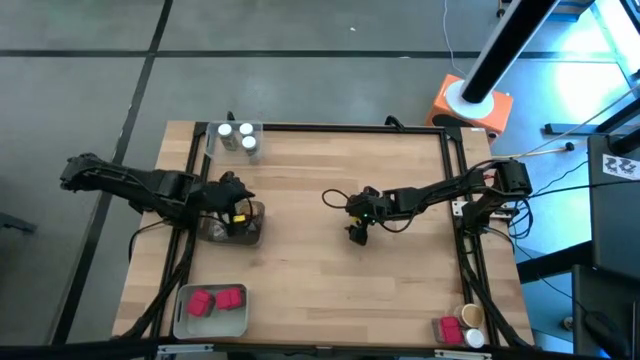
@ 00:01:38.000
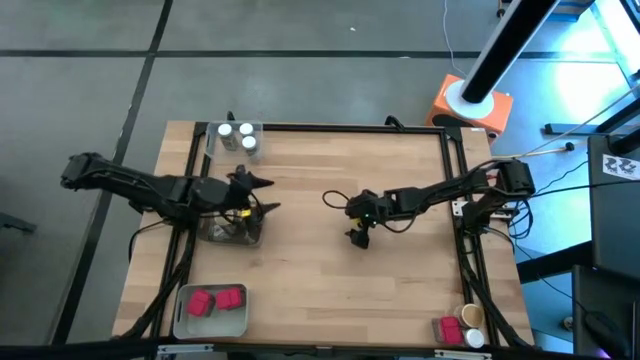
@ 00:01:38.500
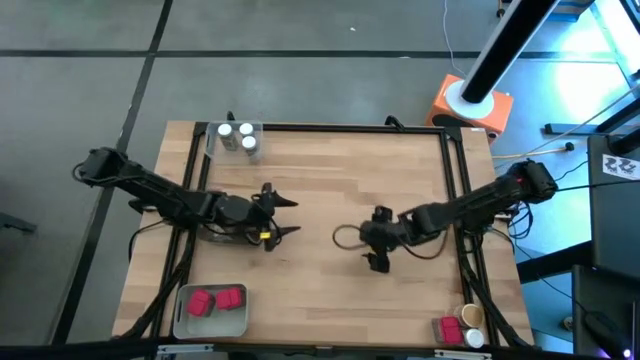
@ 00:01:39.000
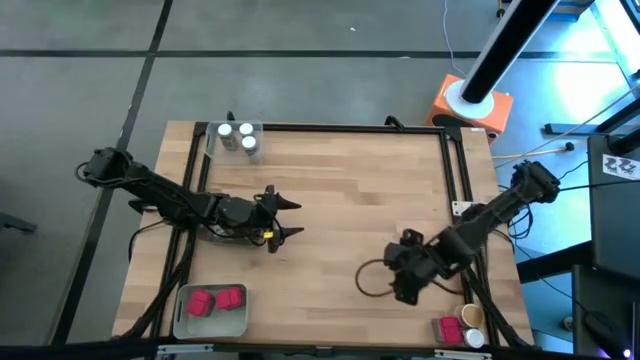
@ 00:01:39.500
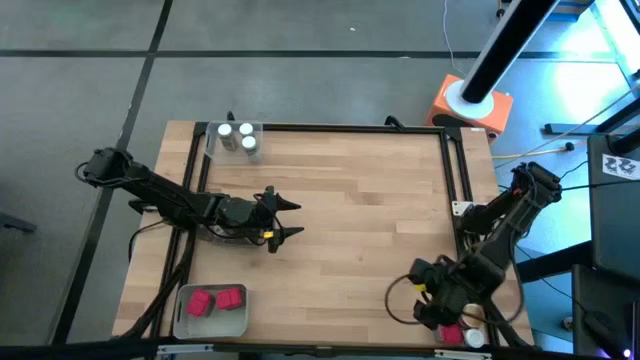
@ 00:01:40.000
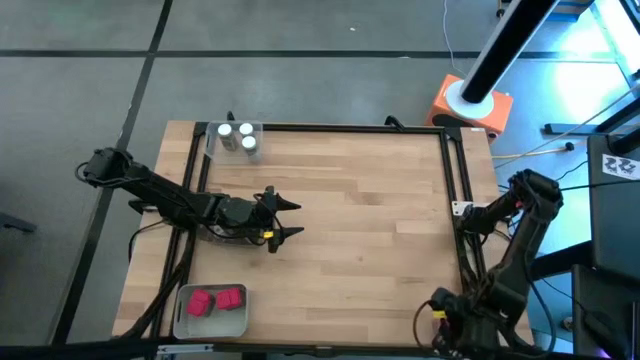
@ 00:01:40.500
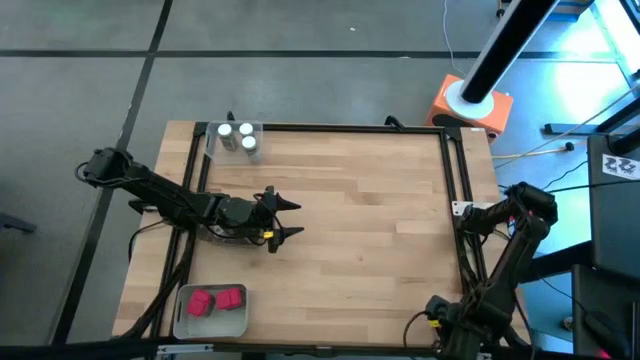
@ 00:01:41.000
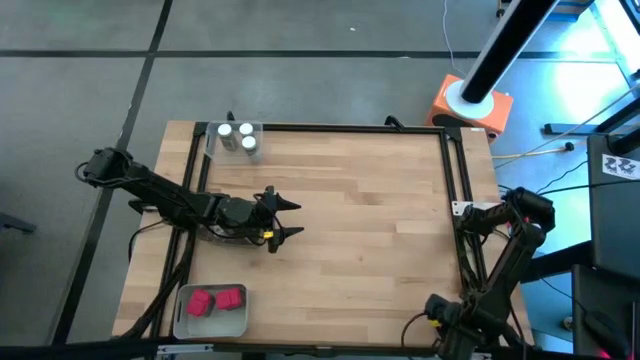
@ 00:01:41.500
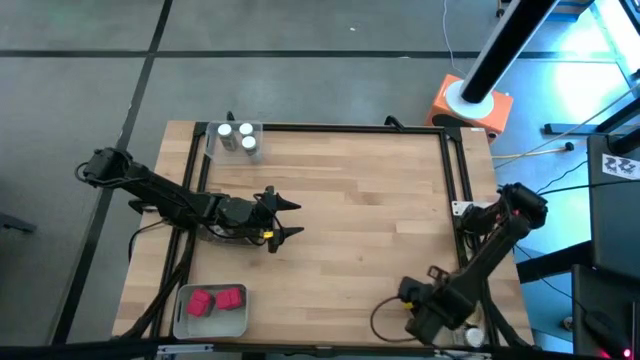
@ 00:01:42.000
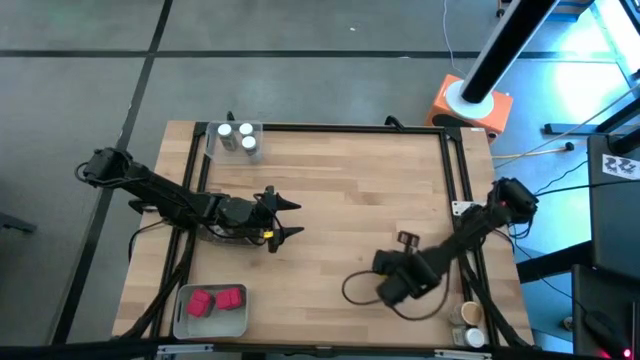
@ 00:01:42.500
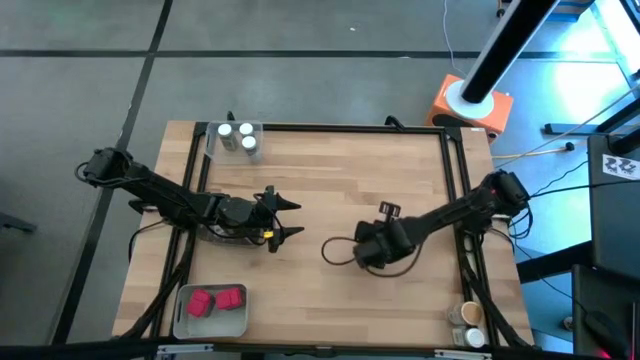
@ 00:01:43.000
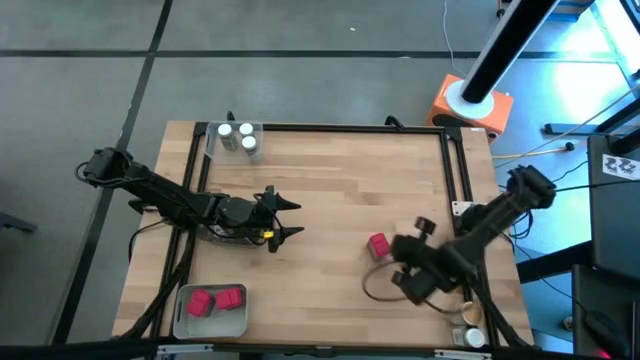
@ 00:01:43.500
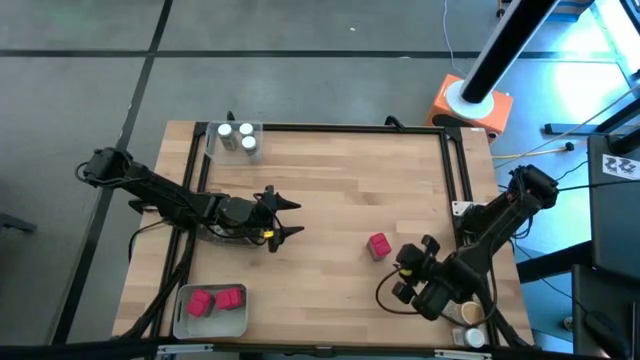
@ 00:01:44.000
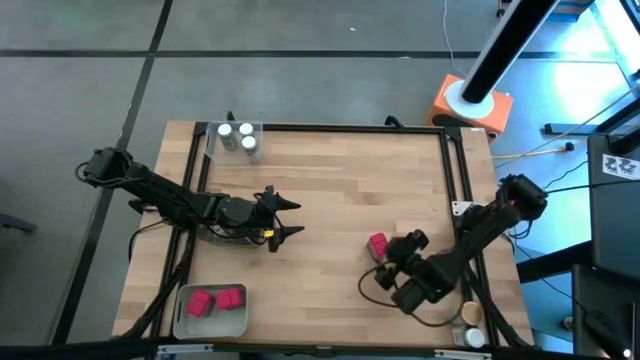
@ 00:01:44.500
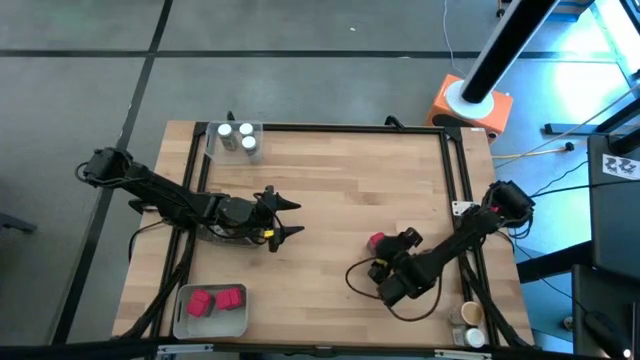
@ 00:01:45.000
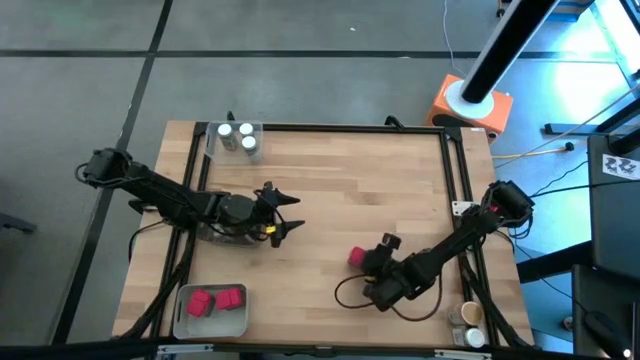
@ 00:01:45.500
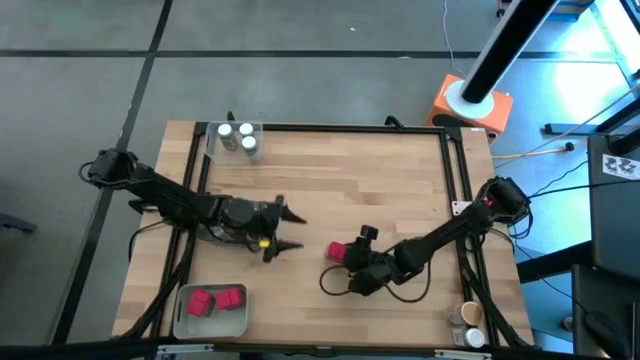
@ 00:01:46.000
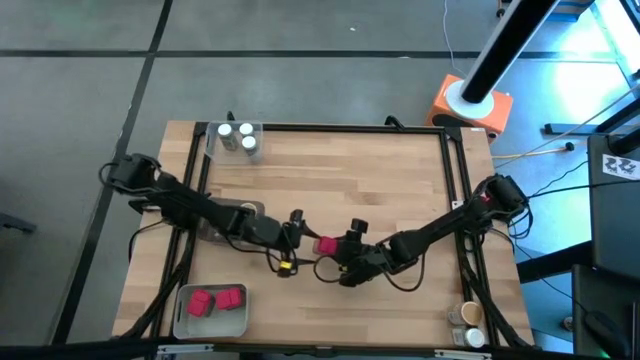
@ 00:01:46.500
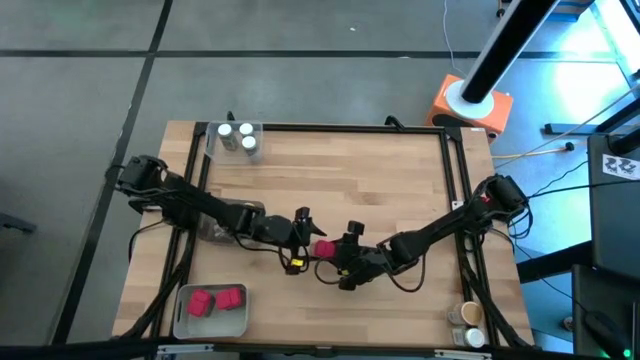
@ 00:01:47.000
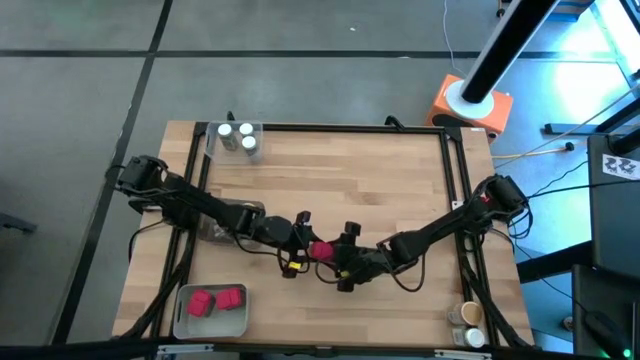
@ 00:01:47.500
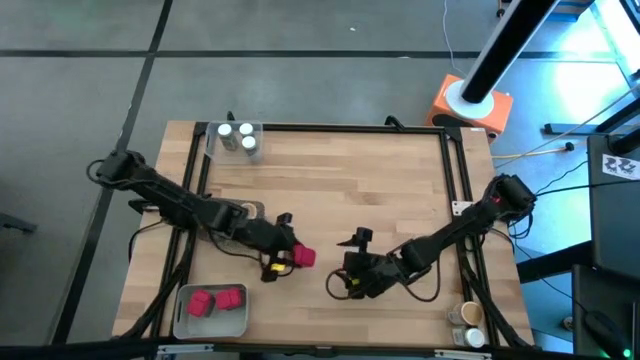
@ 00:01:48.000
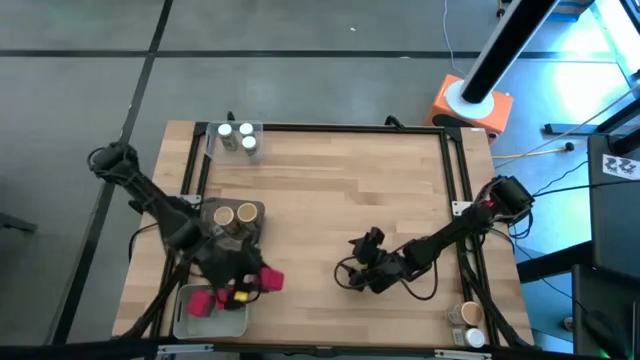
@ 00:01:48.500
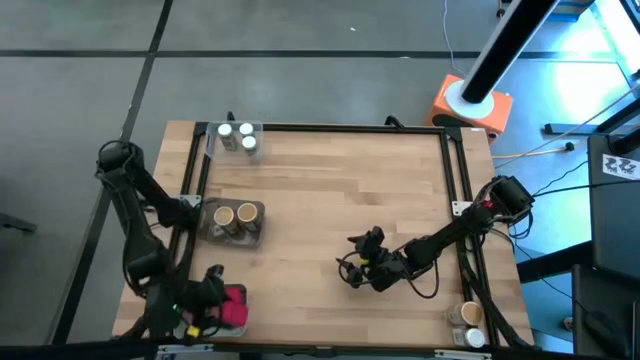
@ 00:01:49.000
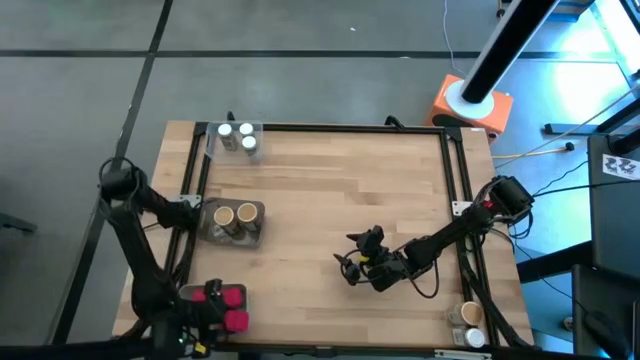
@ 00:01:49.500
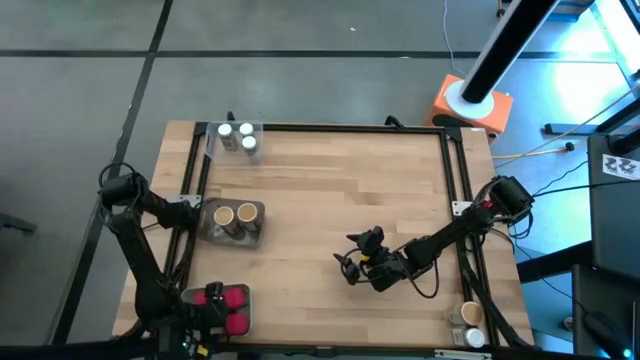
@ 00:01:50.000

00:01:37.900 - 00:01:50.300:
Task: Sort spices by type
Put the red spice can into the gray bin

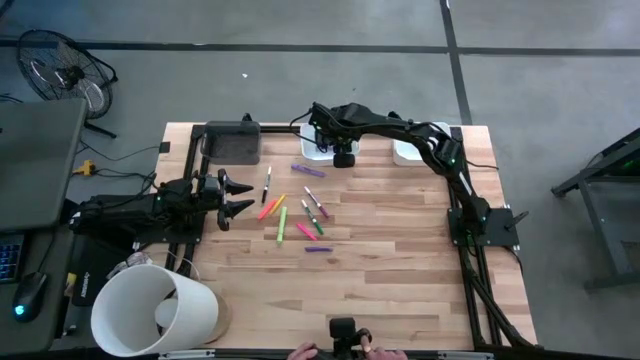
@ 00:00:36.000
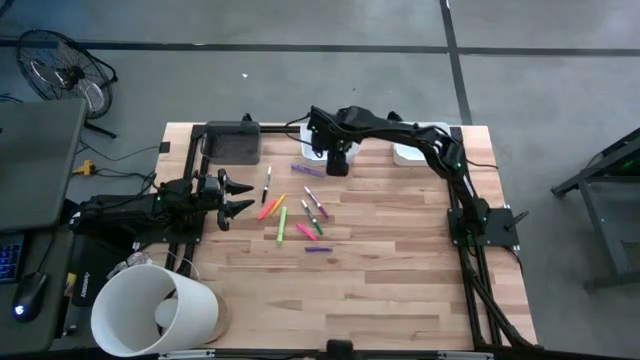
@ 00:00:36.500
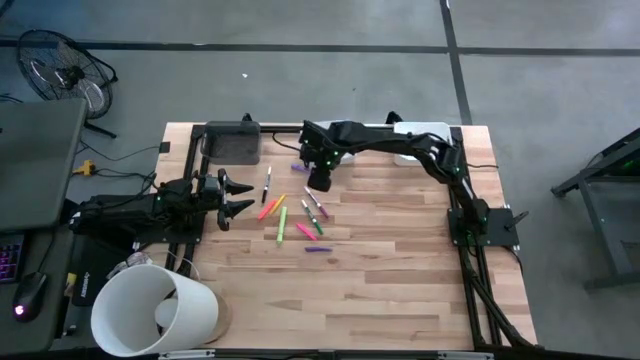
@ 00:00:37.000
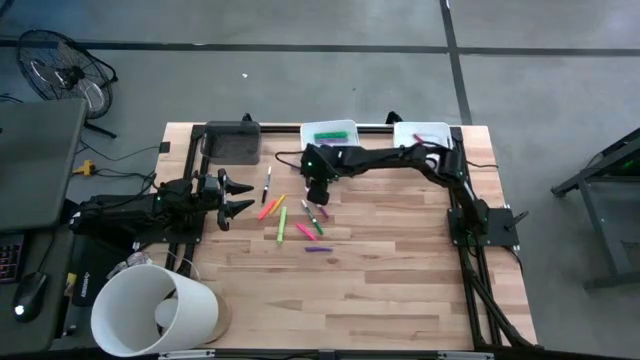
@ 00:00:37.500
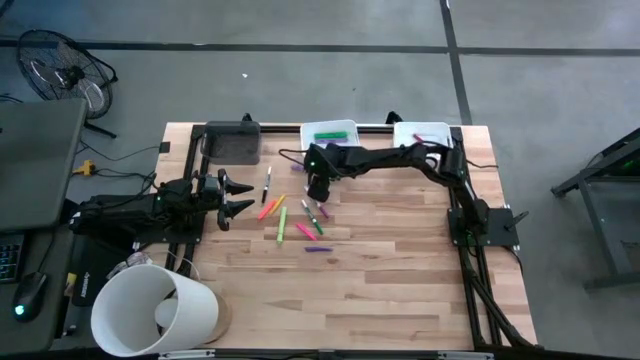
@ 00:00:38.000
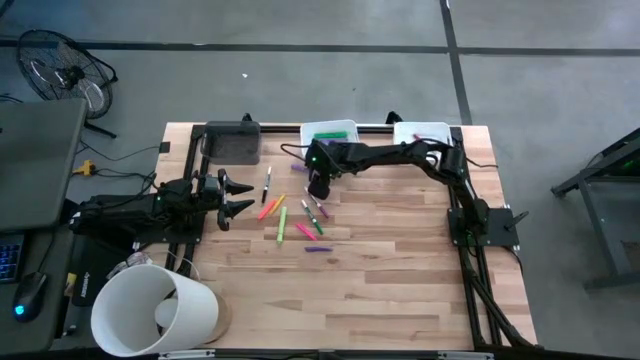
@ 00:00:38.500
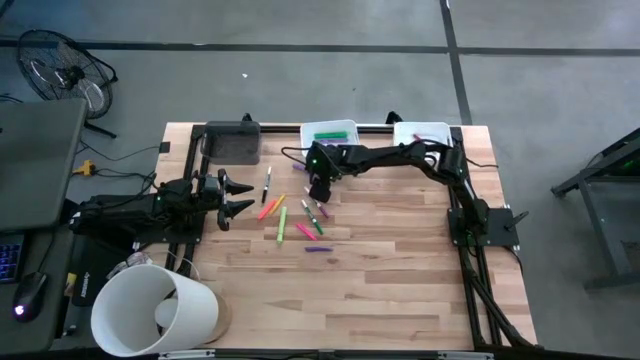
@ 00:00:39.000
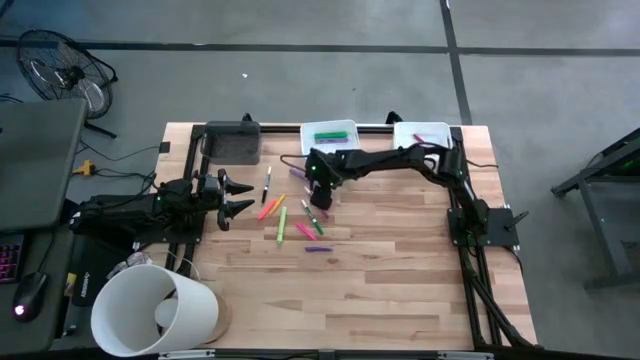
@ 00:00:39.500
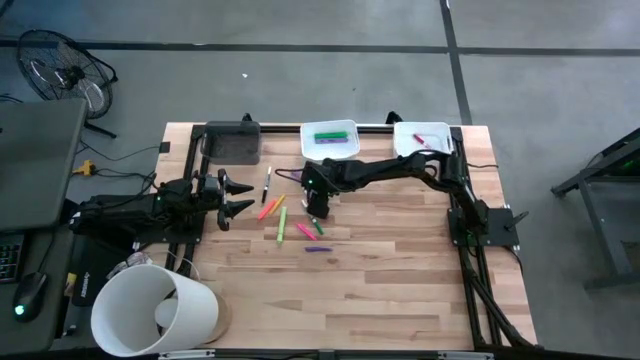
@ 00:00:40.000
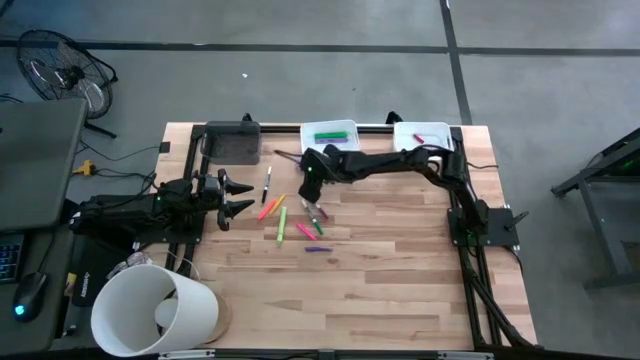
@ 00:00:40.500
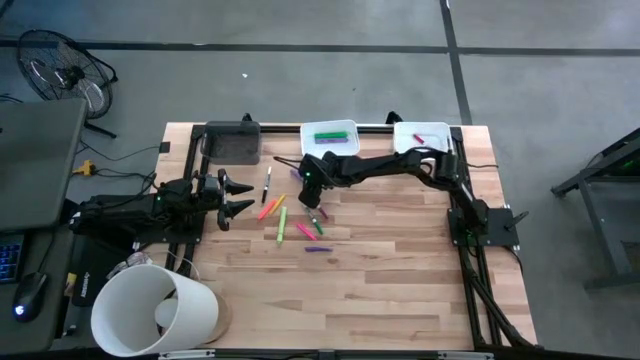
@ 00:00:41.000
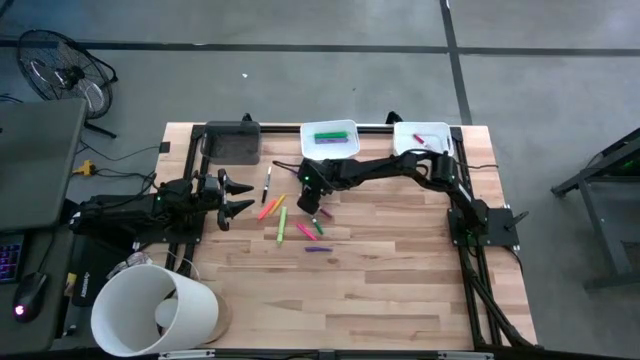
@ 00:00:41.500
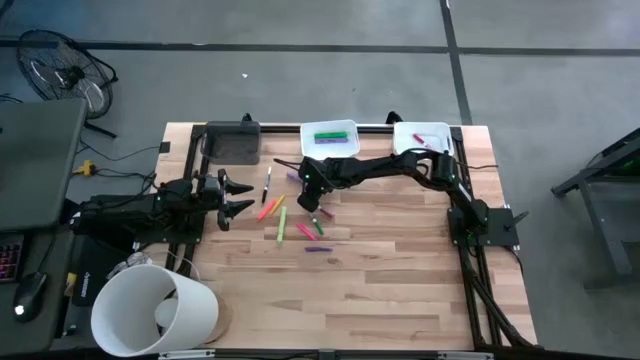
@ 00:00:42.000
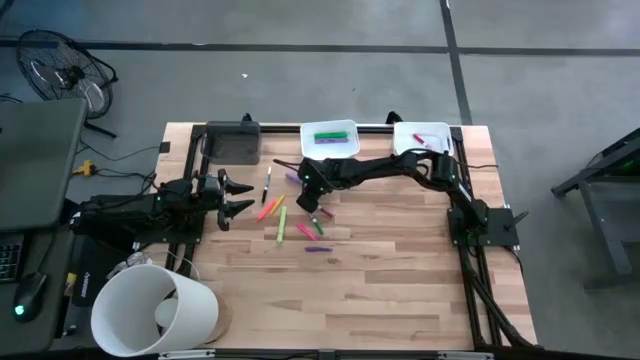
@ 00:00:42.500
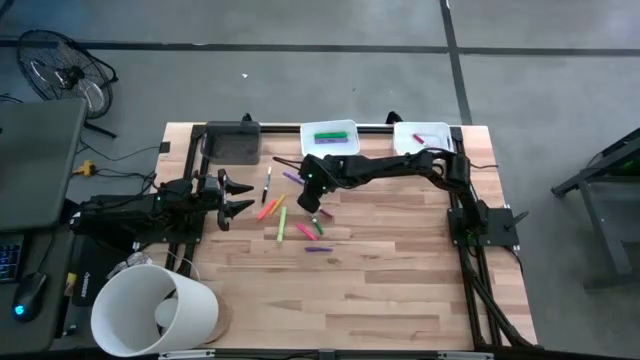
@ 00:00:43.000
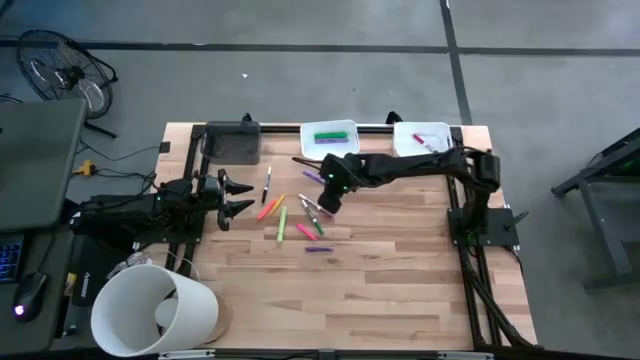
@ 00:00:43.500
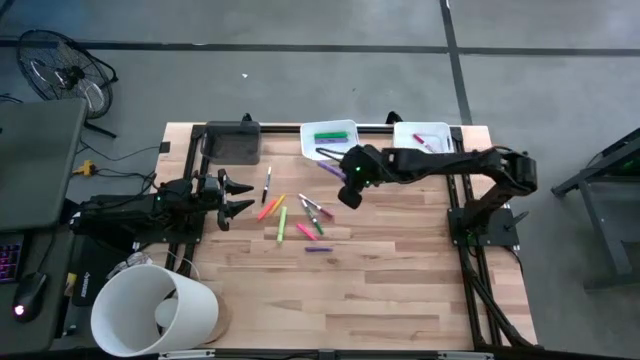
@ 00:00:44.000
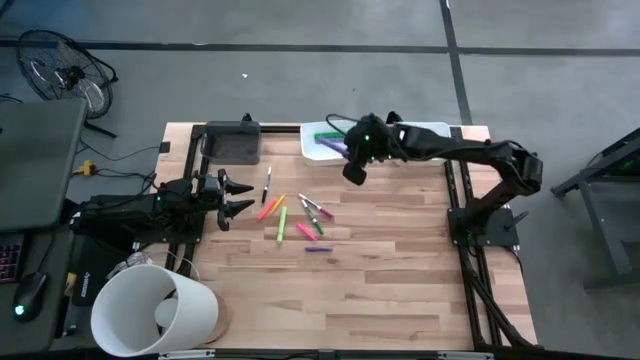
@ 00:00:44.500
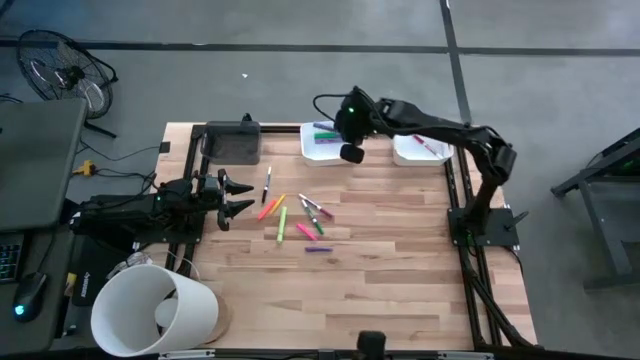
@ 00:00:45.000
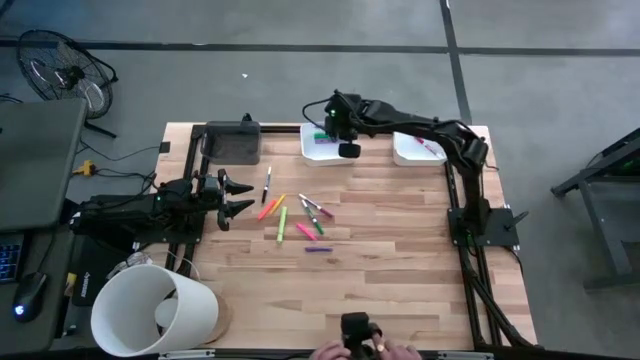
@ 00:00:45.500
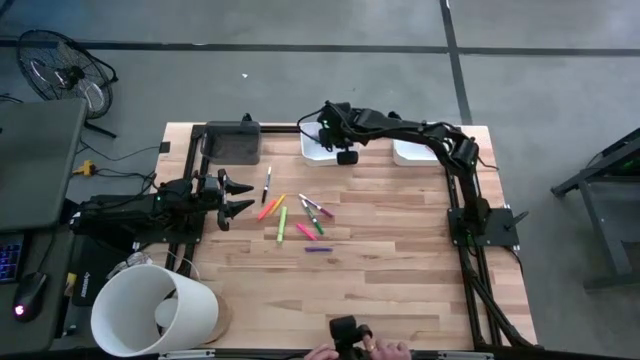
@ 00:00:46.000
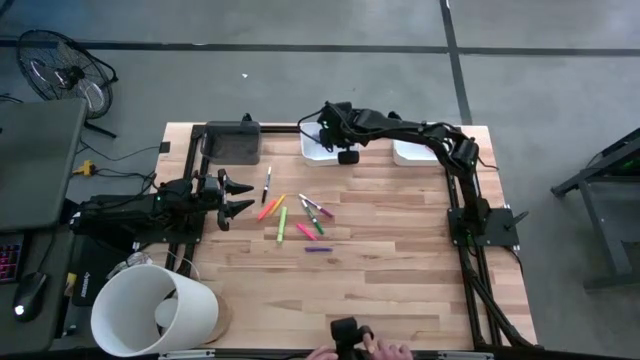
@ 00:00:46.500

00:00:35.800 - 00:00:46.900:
Task: Pick & Place Markers
Put the violet highlighter pen into the left white bin
